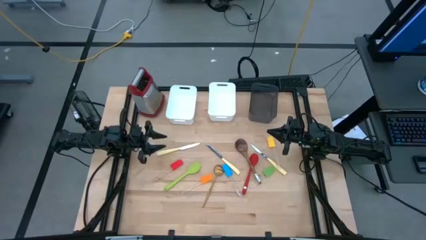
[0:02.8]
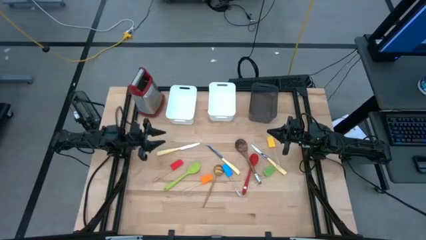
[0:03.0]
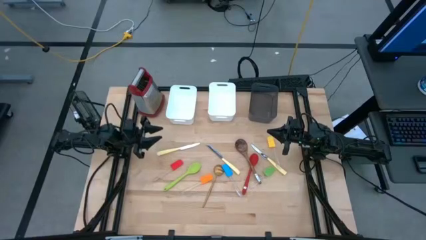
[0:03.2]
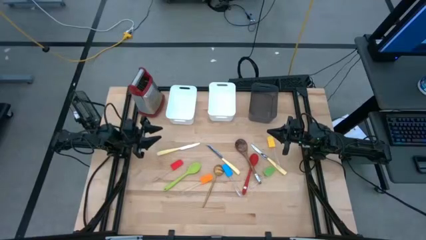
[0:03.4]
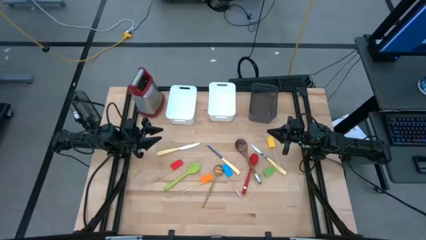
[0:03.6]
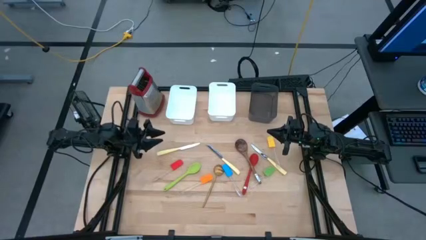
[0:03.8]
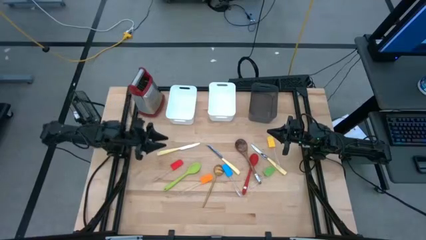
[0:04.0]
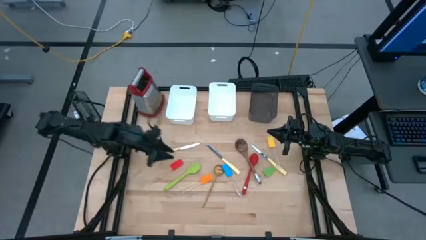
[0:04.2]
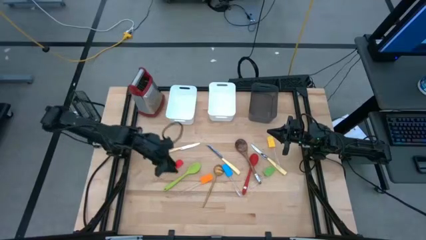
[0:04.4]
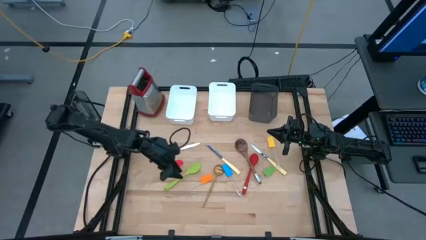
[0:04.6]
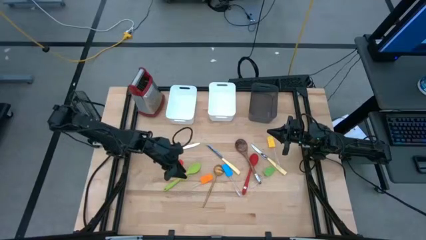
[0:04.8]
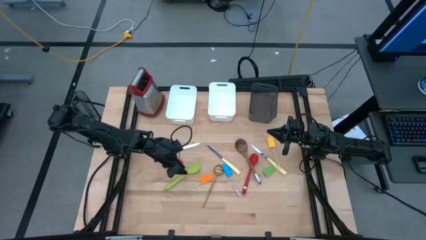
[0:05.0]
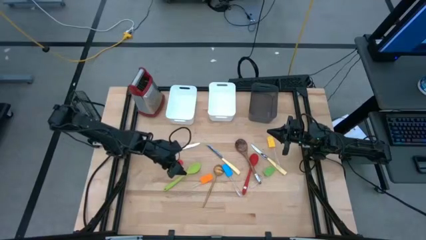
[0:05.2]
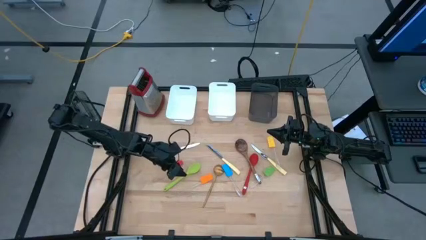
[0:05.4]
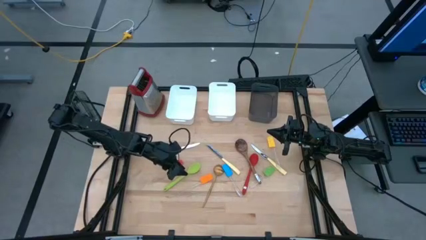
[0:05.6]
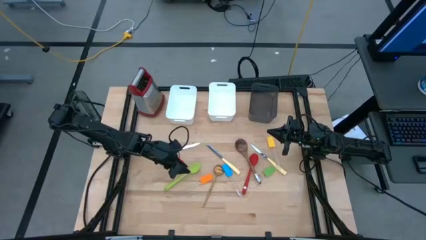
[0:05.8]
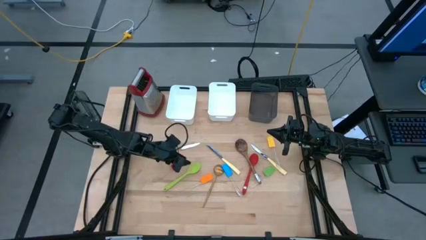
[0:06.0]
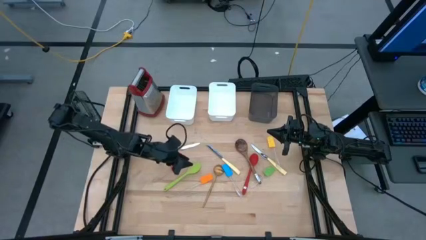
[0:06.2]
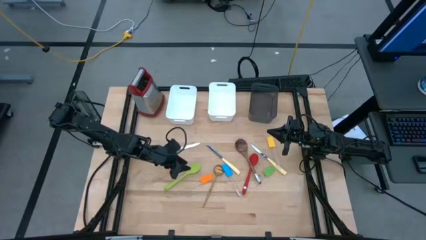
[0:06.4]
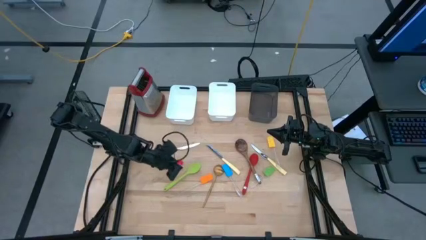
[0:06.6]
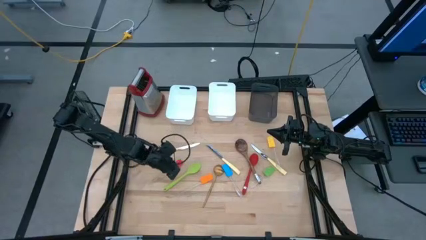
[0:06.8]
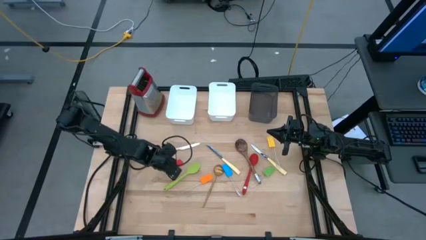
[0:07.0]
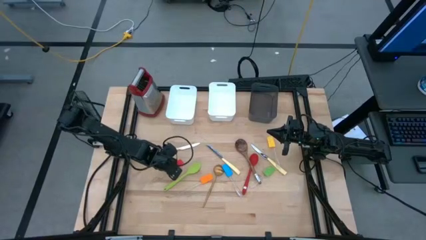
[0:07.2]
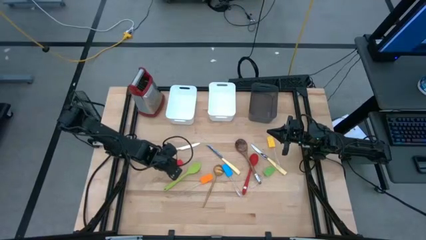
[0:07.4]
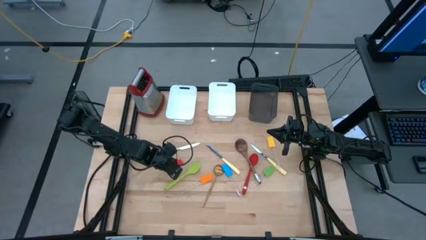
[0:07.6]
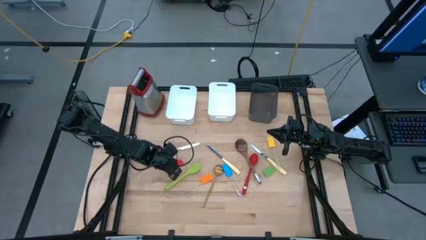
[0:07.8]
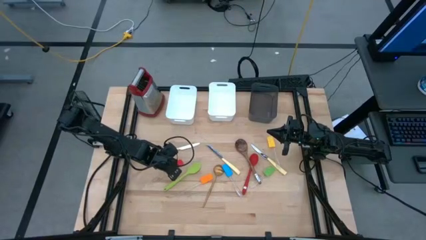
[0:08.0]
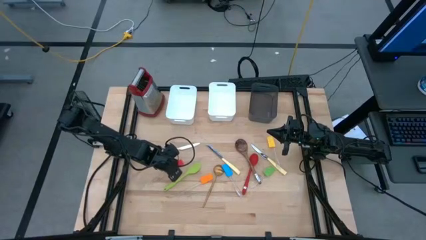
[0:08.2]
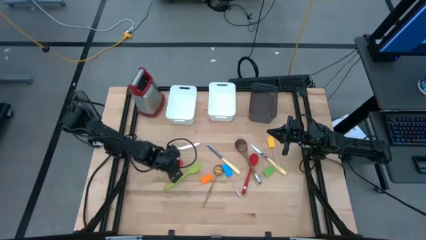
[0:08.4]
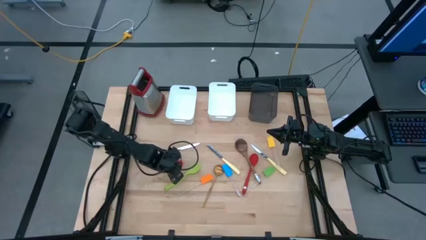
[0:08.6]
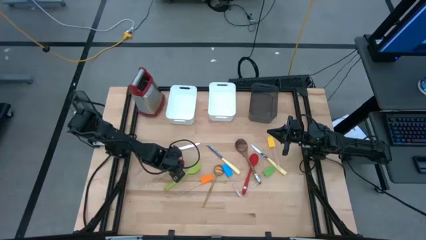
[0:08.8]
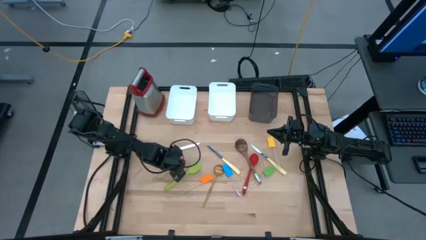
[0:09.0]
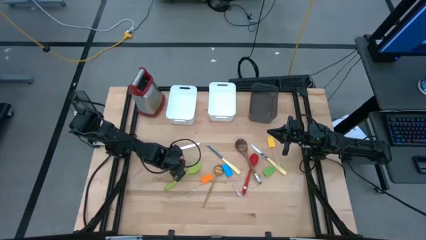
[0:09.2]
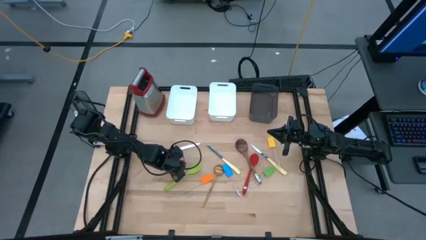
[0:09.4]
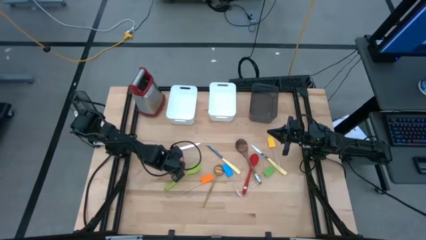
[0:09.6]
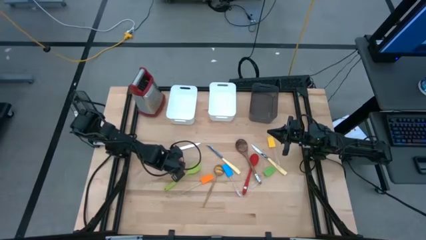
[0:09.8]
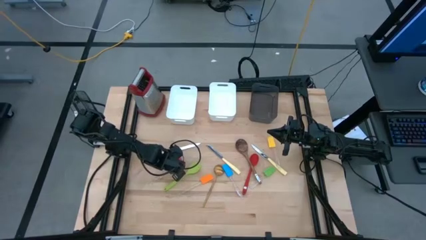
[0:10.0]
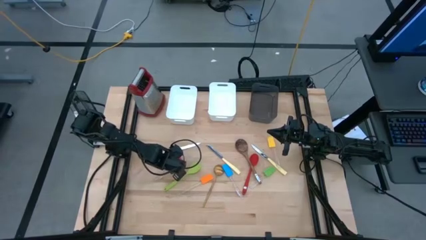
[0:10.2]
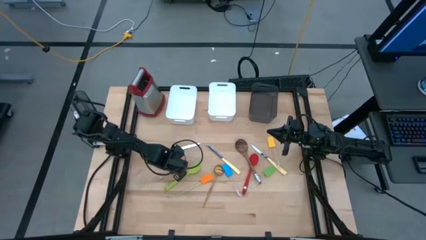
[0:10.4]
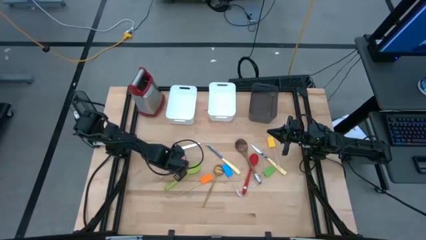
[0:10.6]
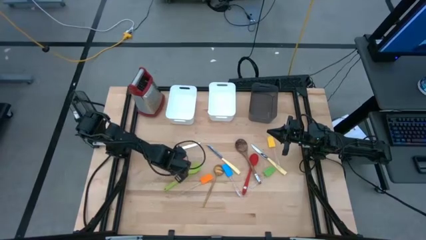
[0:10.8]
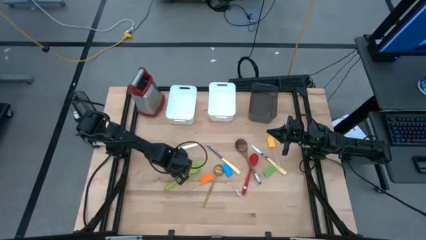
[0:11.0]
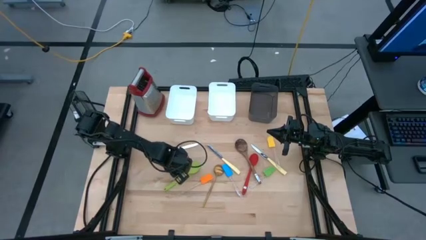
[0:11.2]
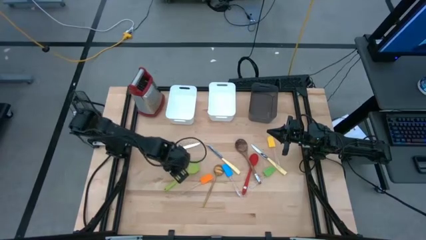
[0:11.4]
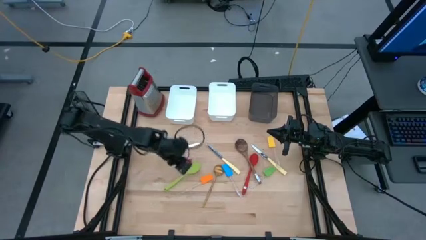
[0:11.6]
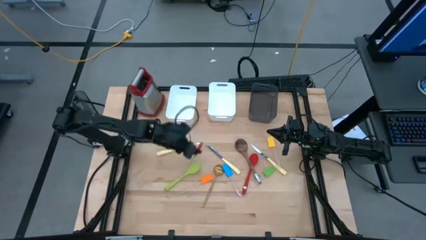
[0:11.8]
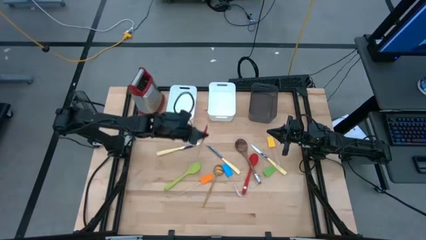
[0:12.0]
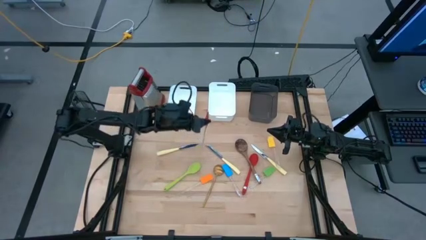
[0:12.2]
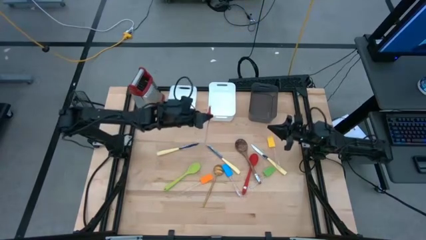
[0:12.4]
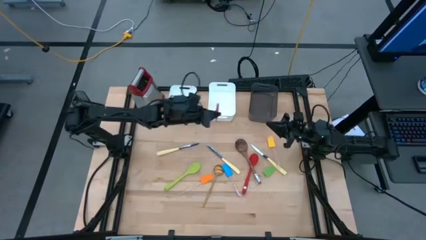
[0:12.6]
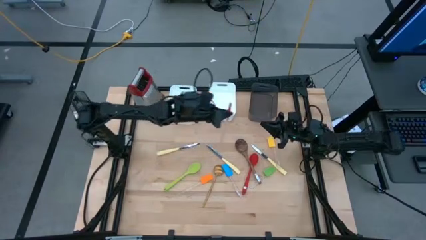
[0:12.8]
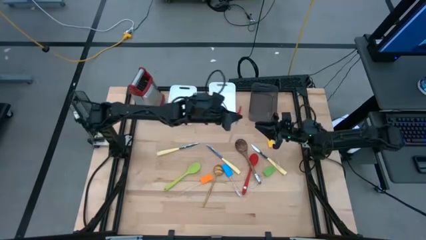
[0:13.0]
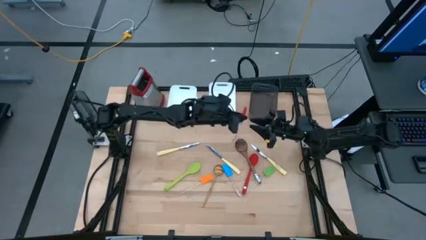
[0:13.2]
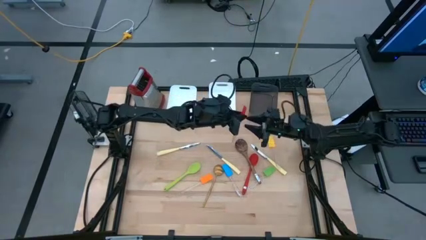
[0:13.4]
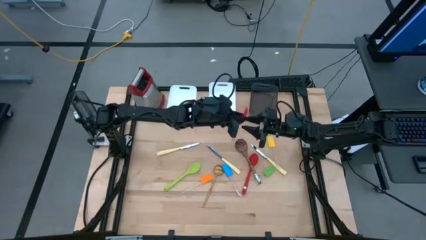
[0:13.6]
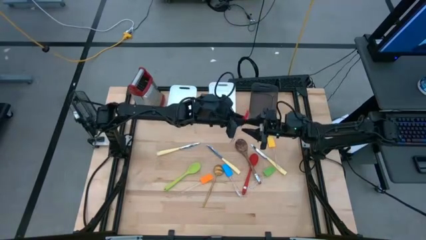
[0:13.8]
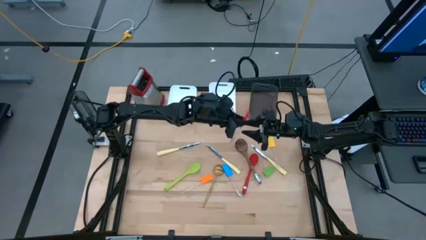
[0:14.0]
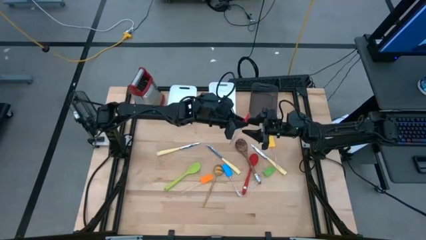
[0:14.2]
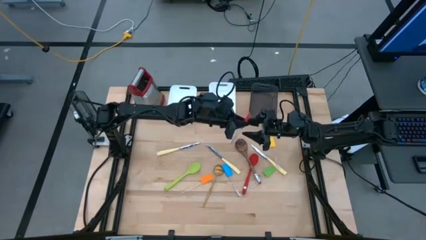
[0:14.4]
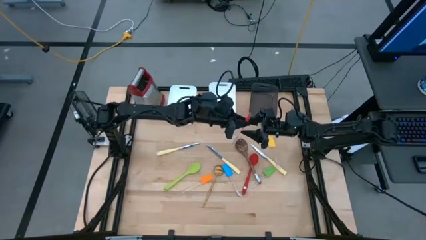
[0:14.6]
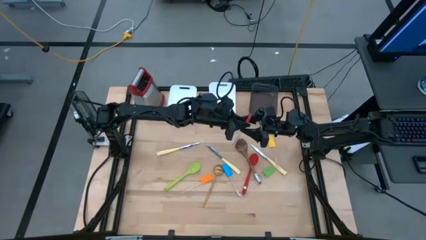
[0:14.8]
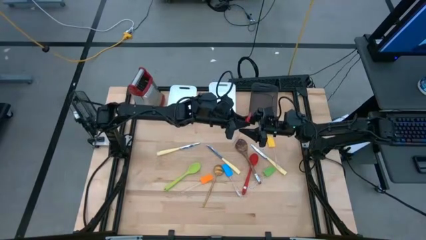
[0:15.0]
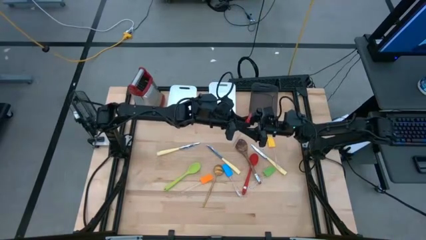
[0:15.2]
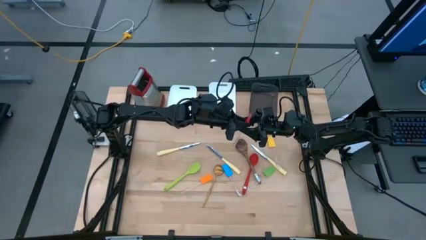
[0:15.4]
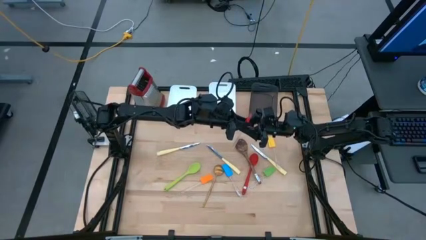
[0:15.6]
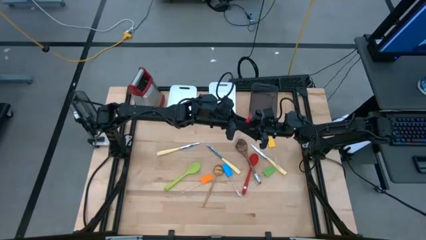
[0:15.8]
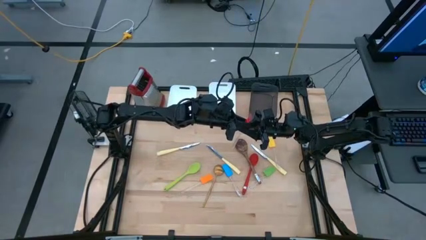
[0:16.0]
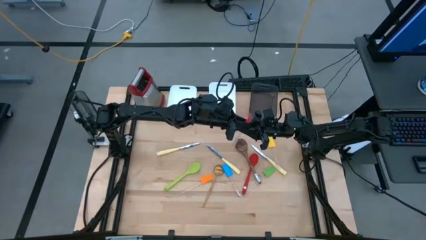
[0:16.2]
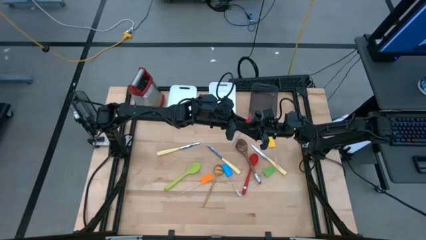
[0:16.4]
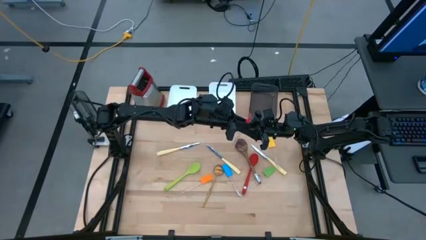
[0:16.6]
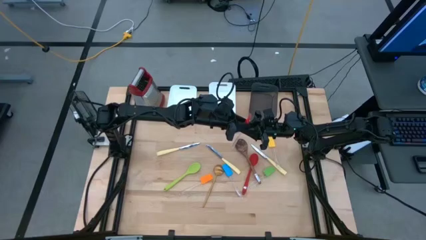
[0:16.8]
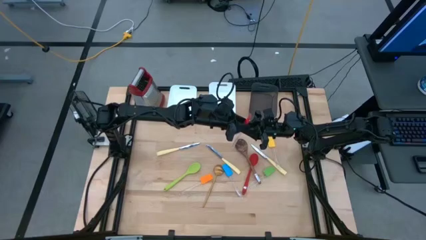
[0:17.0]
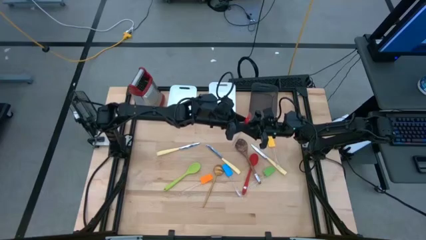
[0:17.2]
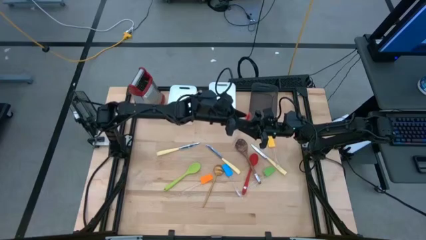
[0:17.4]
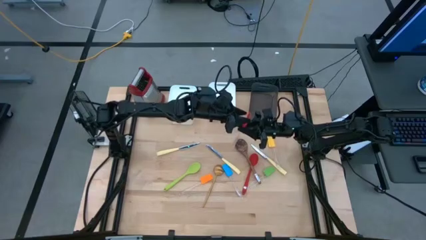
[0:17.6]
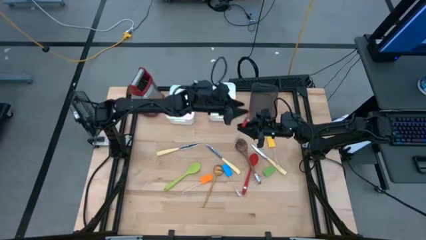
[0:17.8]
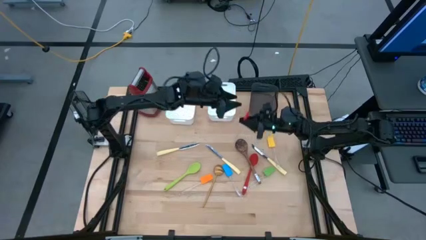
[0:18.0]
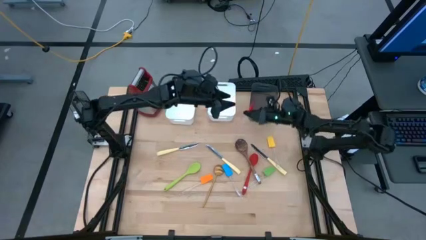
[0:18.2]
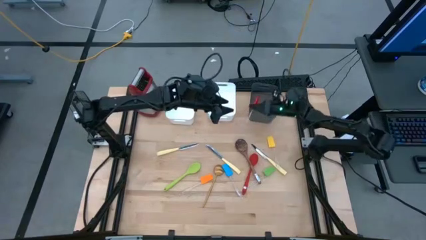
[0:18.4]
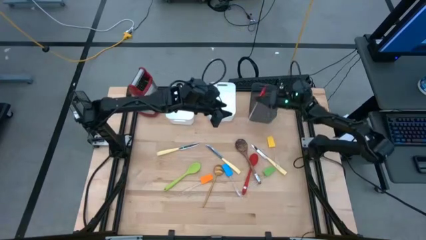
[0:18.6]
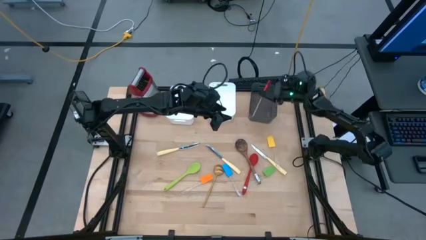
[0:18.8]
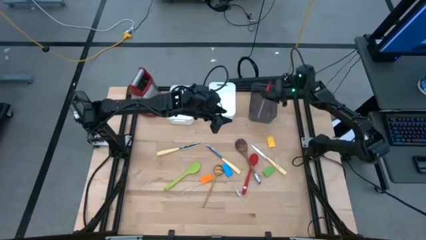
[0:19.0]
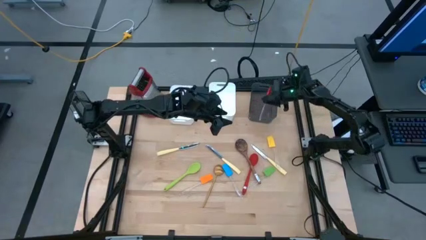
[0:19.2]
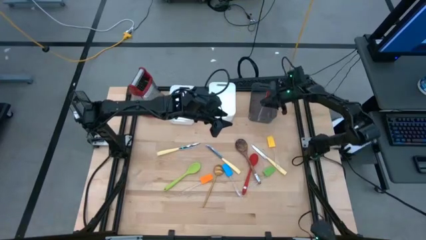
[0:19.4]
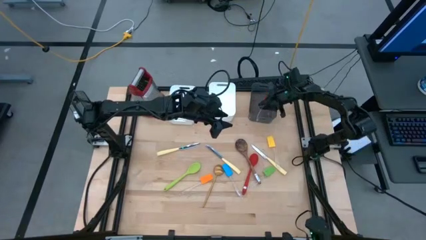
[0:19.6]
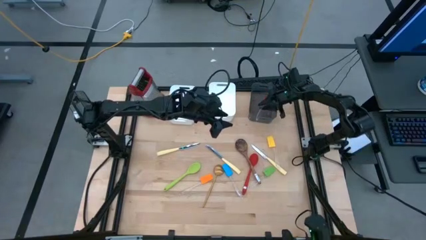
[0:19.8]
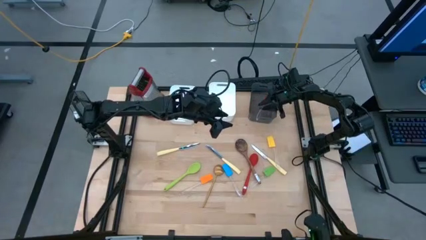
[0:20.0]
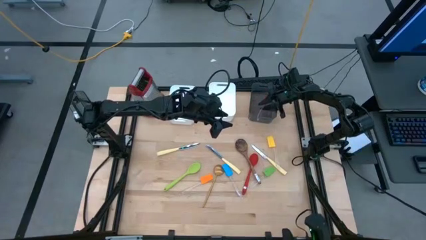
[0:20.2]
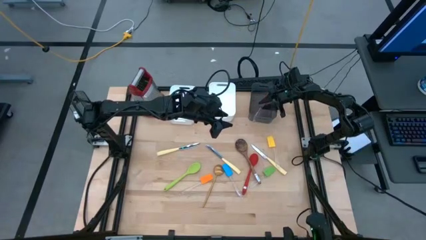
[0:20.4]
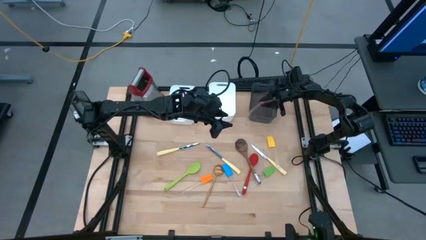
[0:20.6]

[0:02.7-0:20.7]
Task: Pick & Place Kitchen Items
Put the red spatula into the black bin
